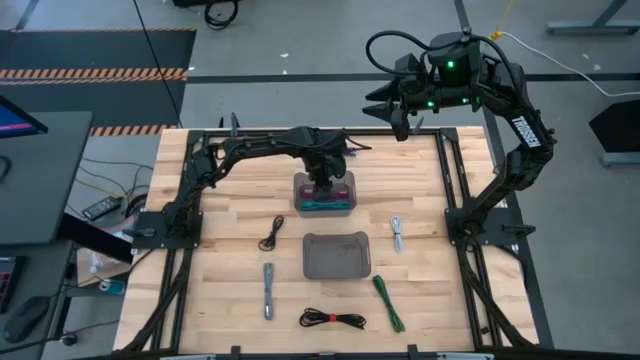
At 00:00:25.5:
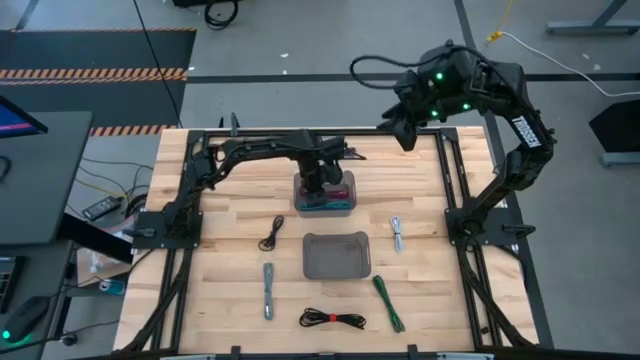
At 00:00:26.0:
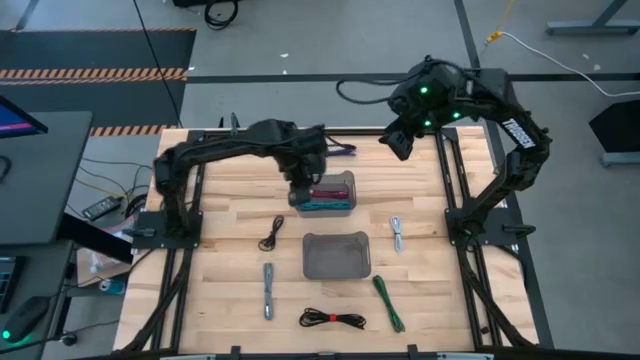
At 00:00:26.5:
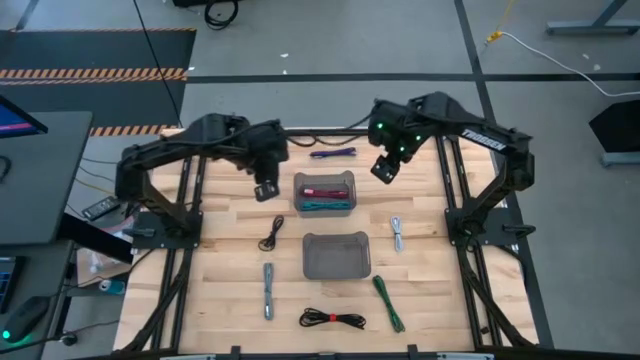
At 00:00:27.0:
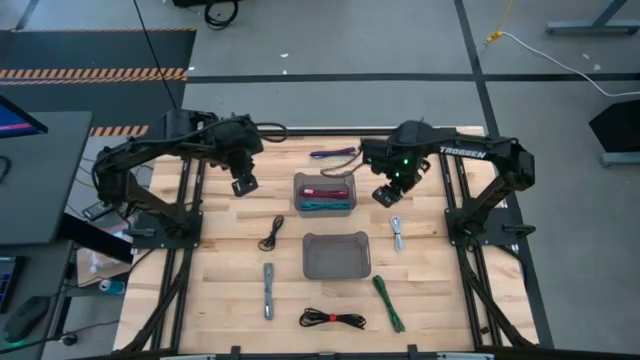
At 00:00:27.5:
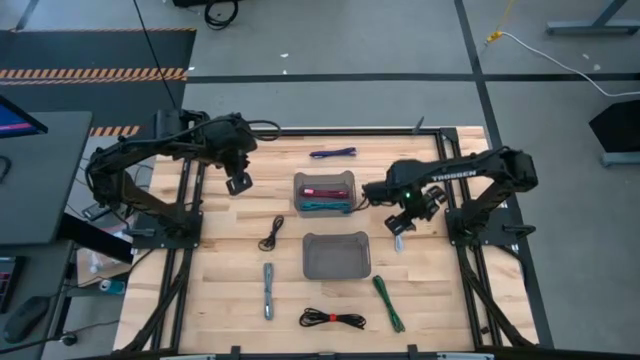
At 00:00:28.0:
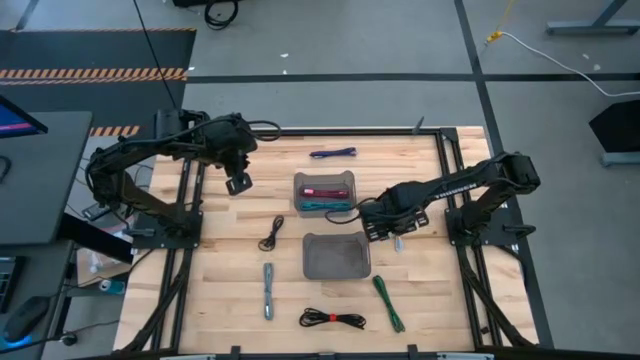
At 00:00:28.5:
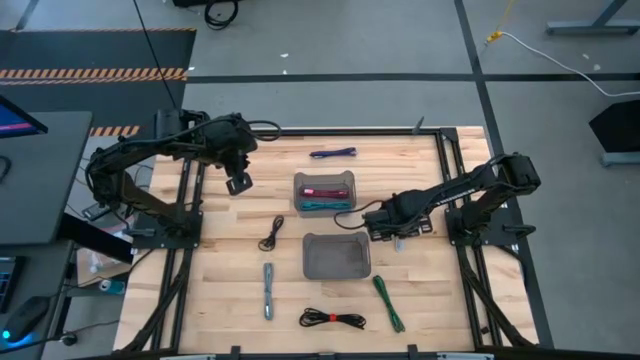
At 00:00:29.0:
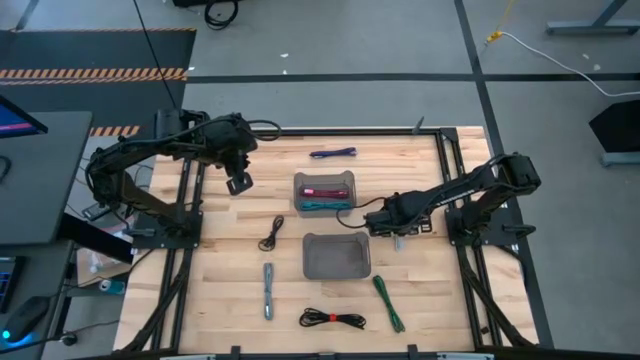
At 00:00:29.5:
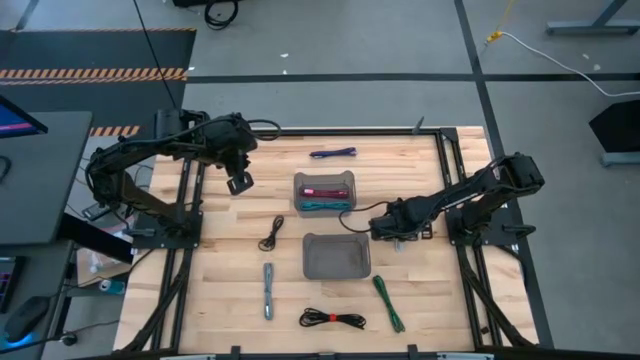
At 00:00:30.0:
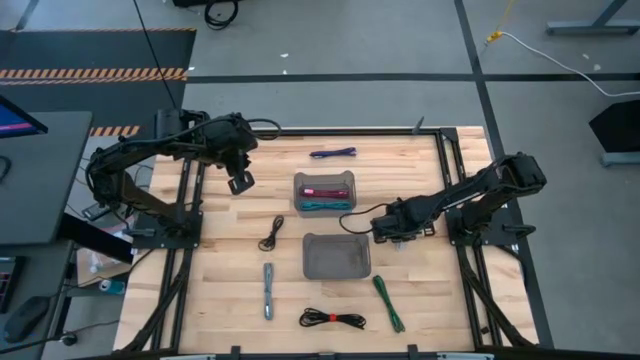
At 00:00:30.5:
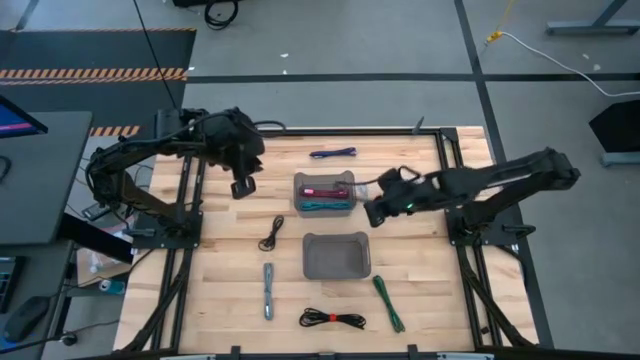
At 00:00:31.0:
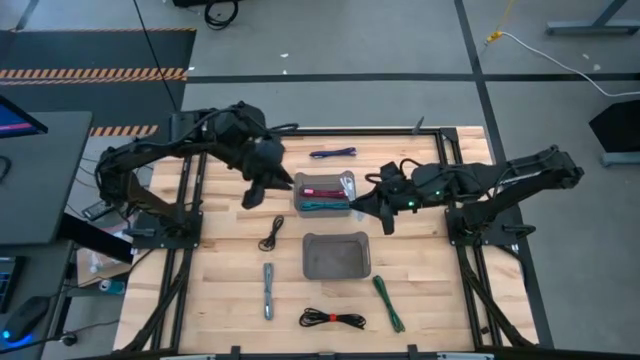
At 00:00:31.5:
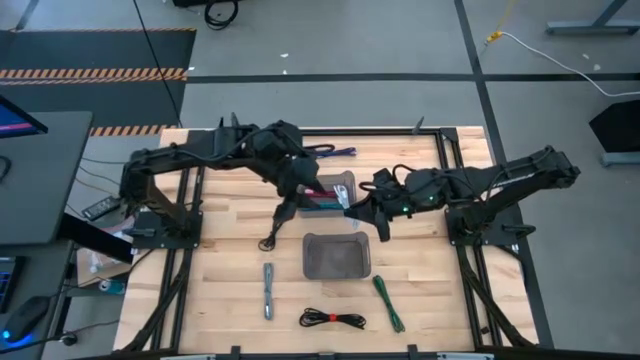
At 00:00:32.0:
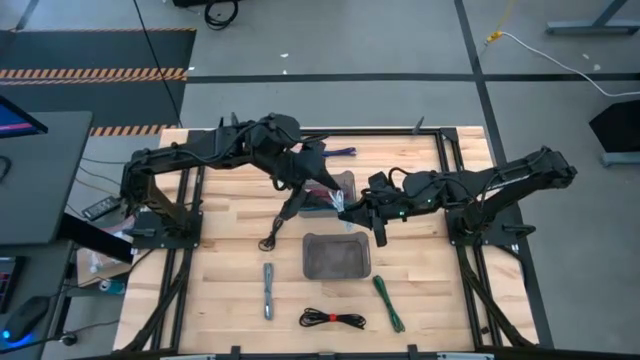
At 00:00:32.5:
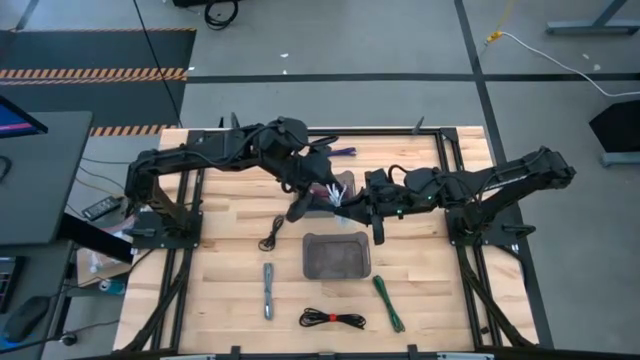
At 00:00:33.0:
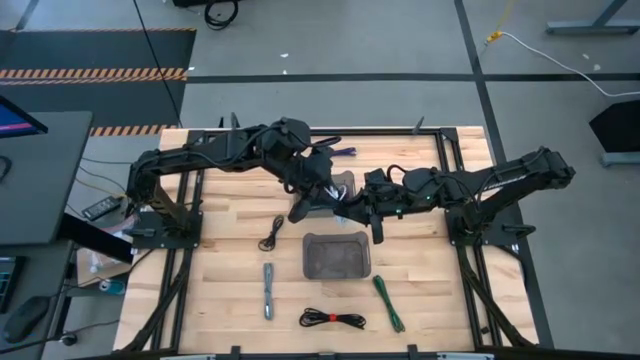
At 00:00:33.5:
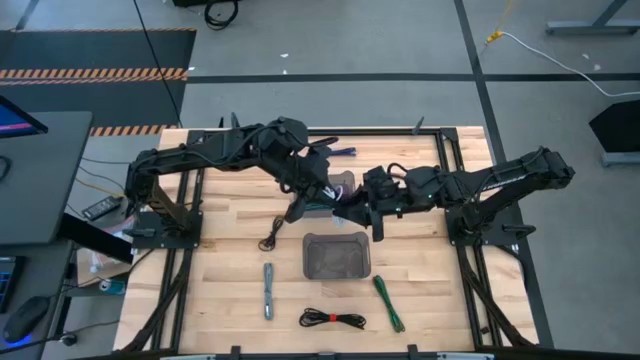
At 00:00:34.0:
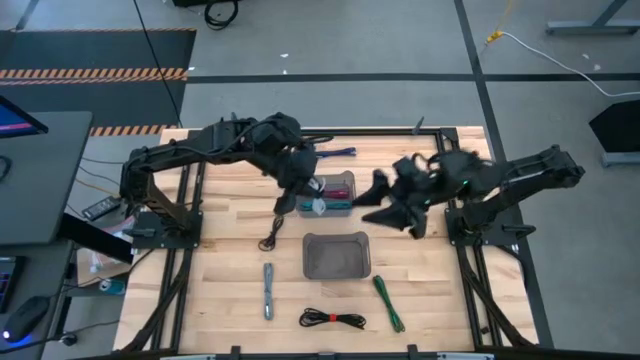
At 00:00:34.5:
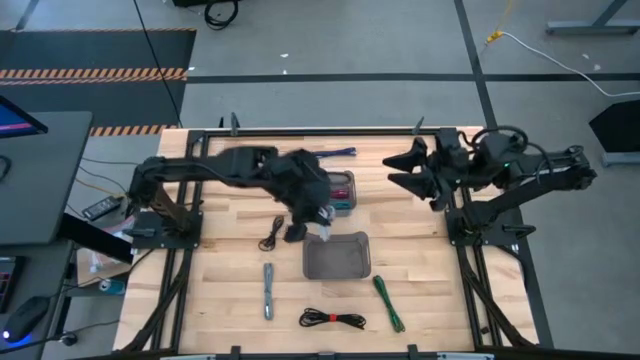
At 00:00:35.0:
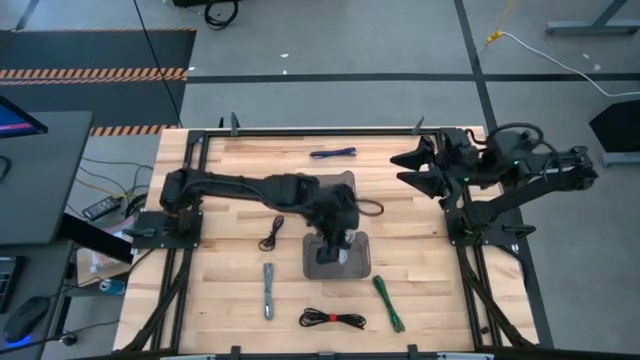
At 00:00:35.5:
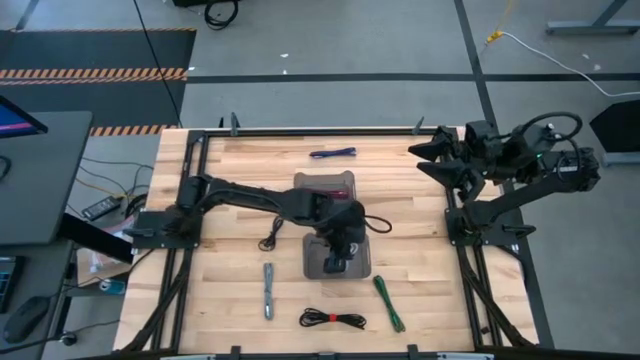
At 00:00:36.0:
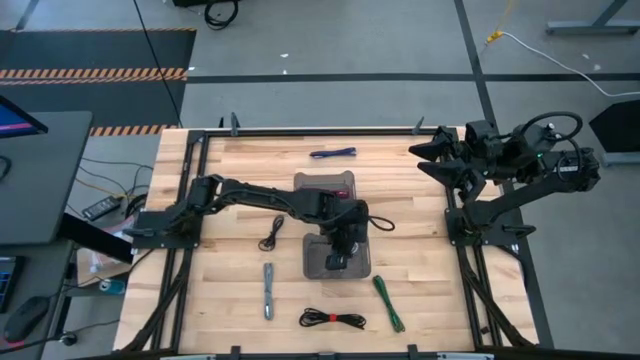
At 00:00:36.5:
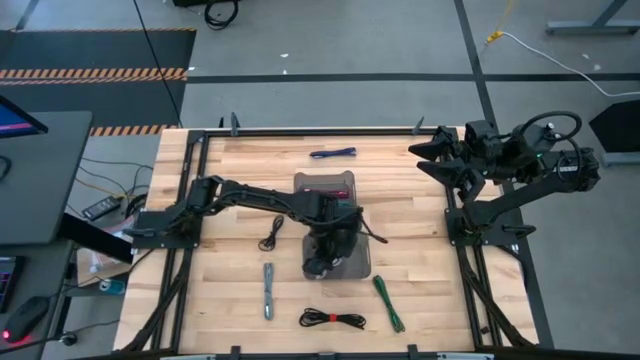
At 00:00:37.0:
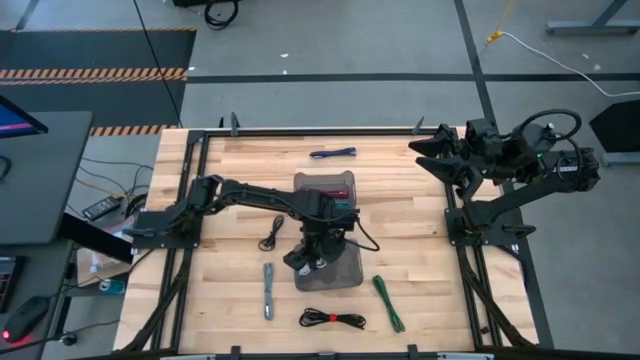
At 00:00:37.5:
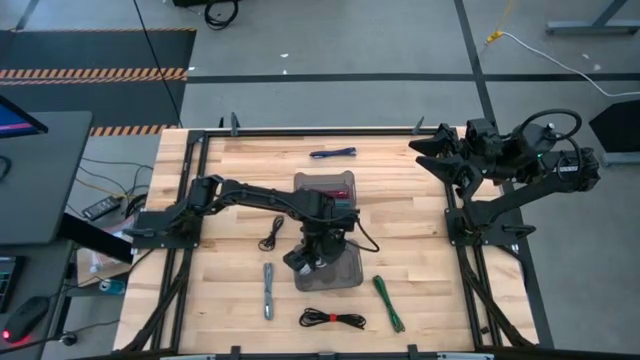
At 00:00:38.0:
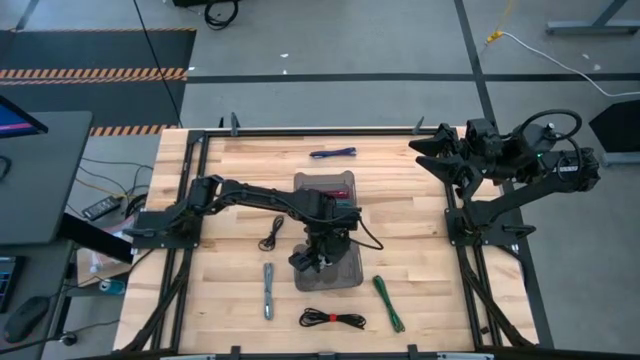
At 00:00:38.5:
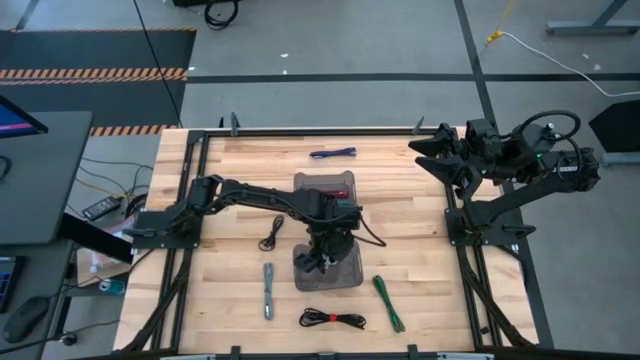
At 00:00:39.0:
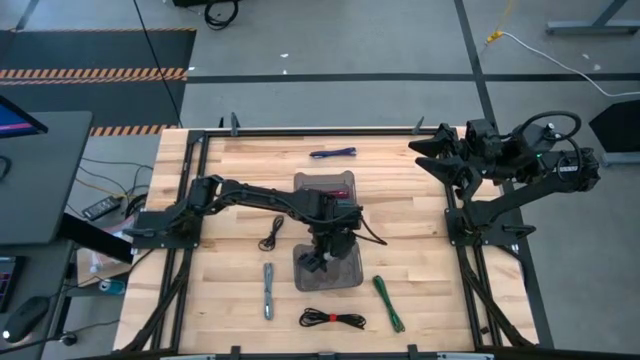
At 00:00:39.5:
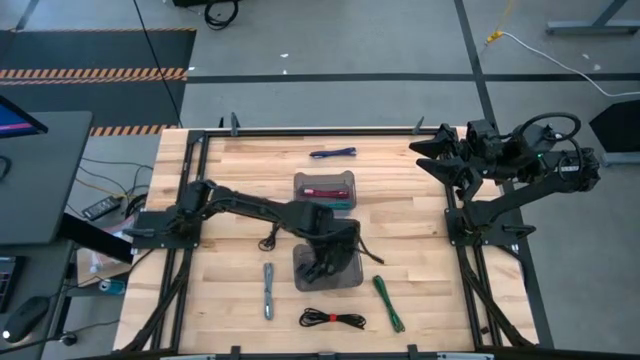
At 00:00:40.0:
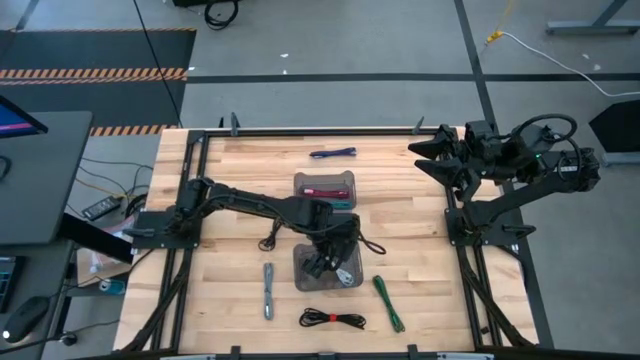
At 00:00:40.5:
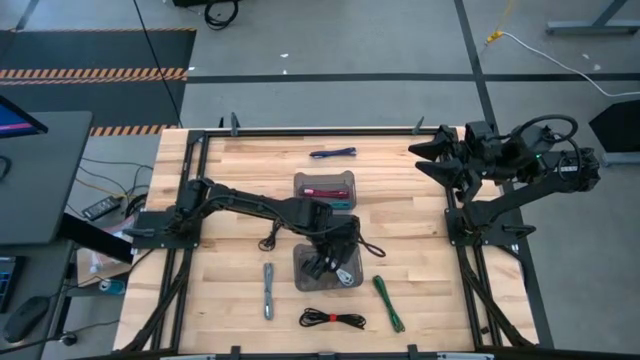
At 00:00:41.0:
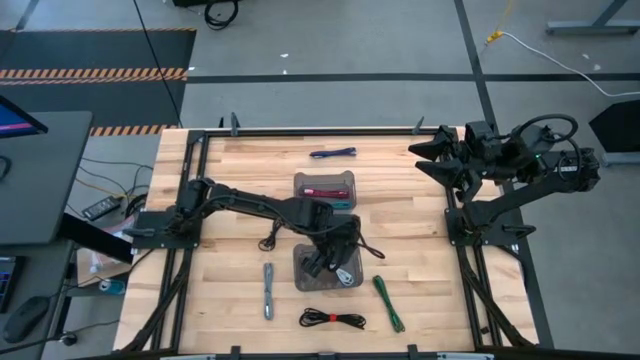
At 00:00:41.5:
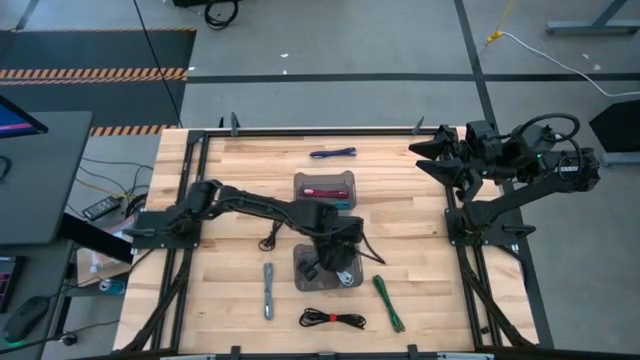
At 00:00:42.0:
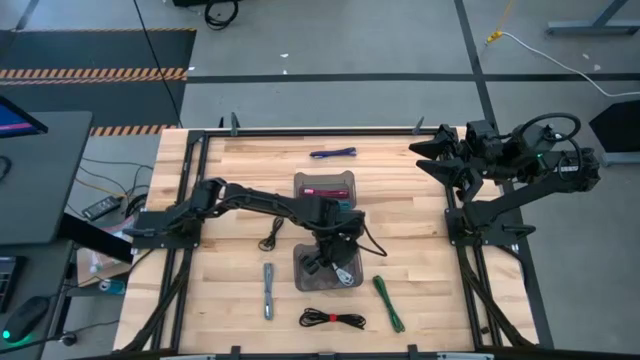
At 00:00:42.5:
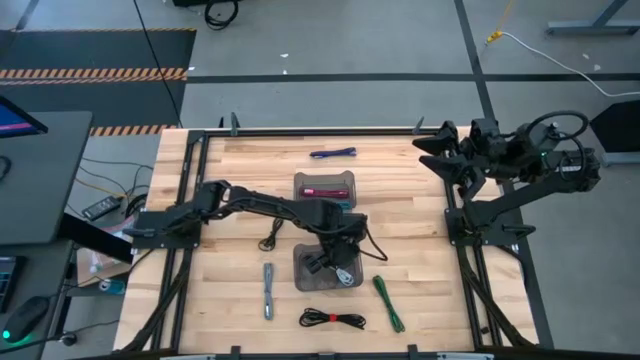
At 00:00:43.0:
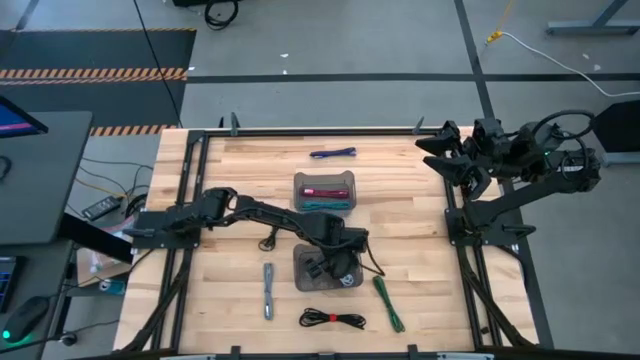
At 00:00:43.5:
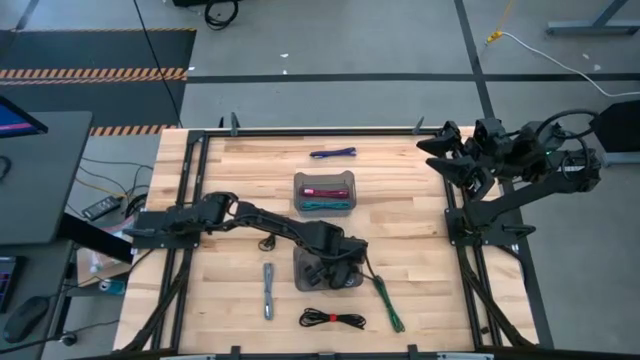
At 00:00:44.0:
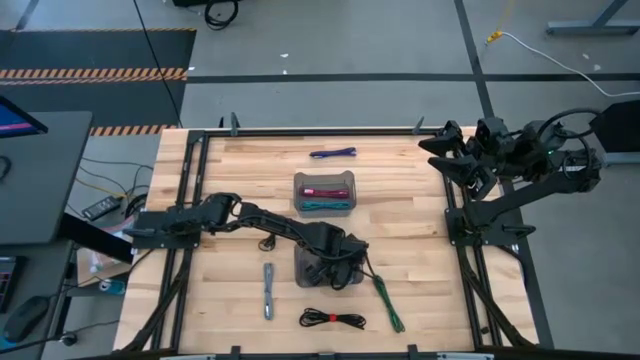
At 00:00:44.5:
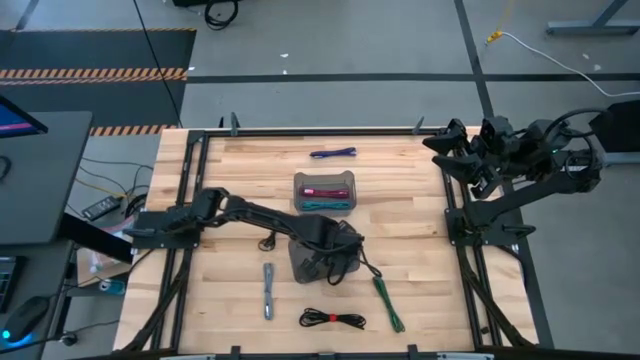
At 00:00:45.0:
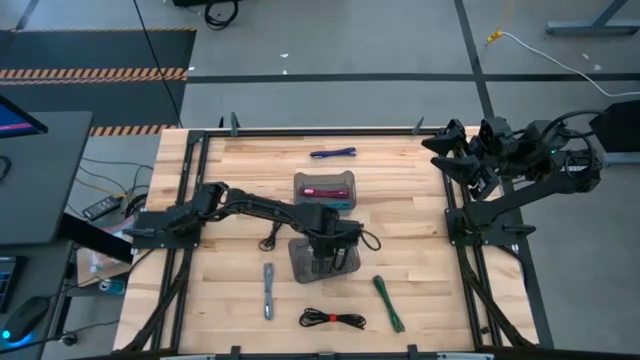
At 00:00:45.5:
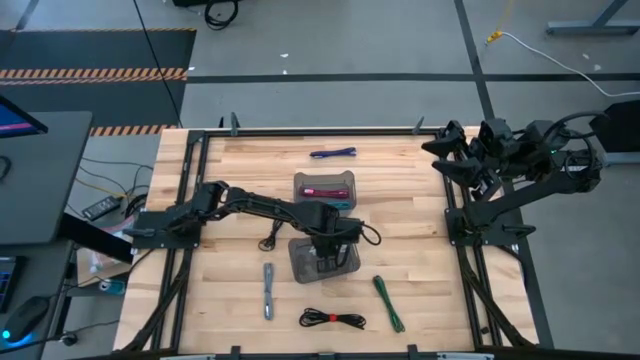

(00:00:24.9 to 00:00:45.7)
Task: Pick and place USB-C Cables
Put the white charger cable into the bottom black transparent bin
